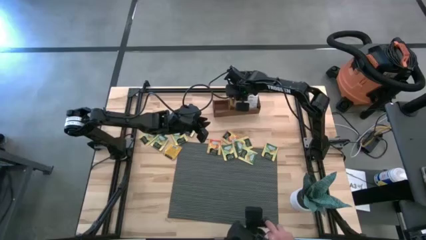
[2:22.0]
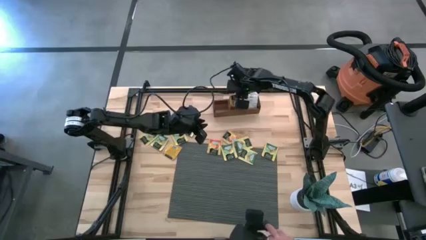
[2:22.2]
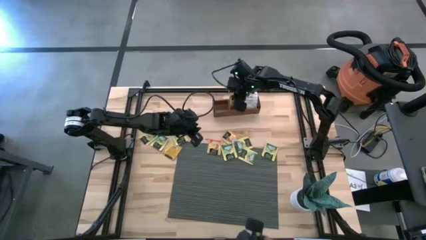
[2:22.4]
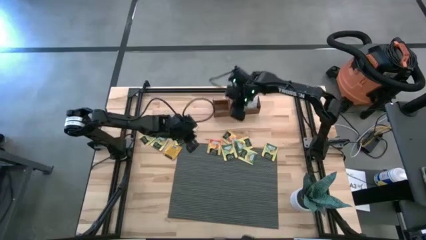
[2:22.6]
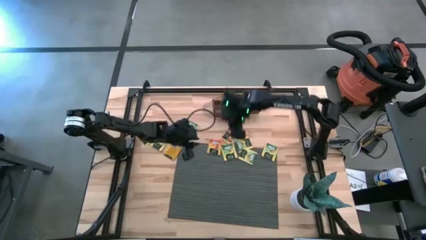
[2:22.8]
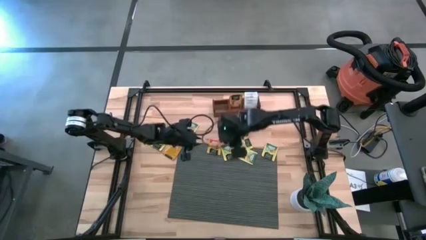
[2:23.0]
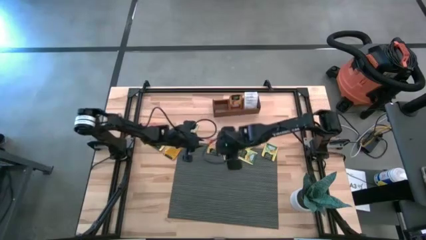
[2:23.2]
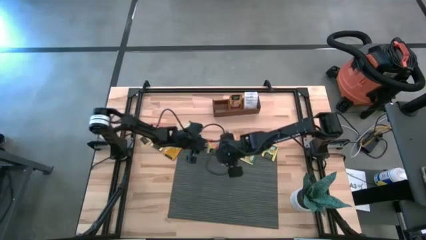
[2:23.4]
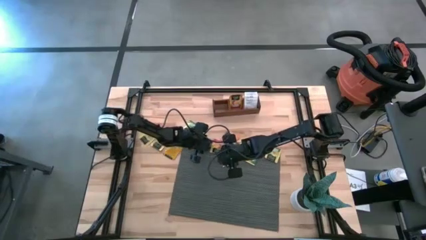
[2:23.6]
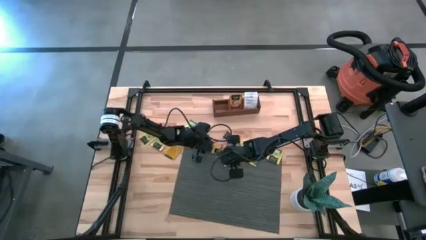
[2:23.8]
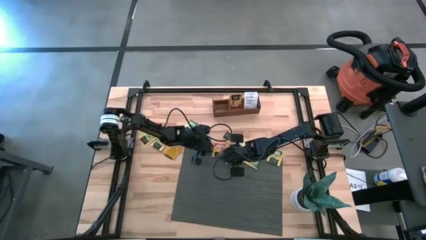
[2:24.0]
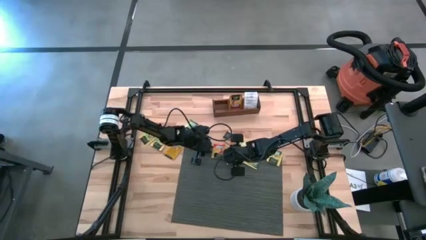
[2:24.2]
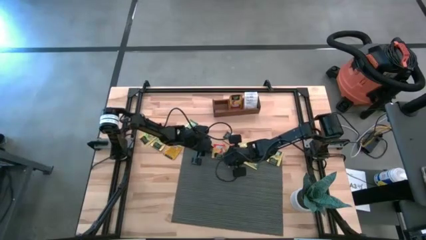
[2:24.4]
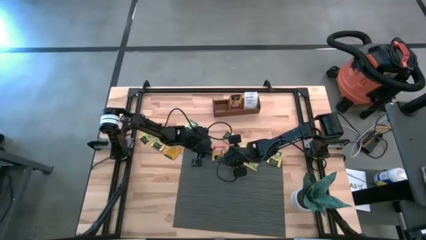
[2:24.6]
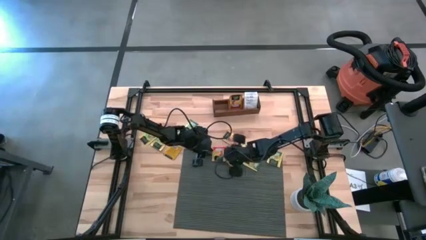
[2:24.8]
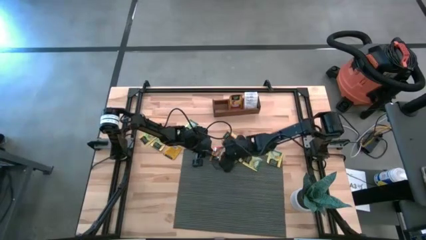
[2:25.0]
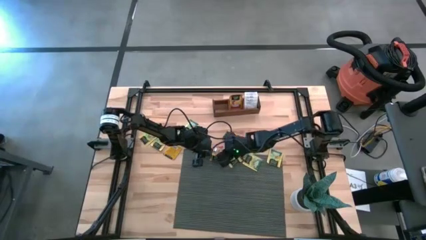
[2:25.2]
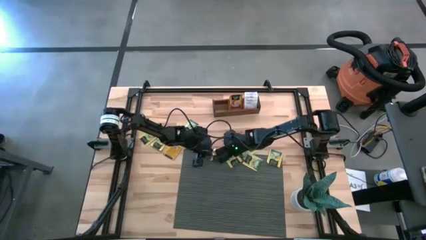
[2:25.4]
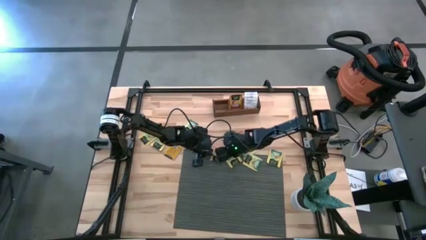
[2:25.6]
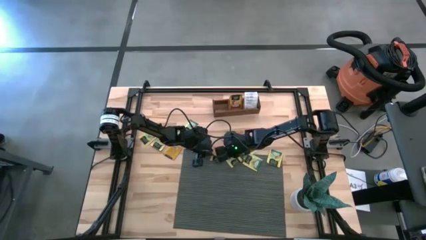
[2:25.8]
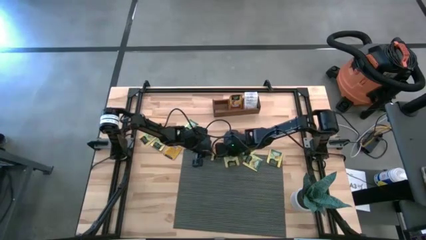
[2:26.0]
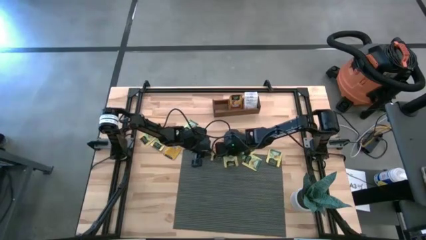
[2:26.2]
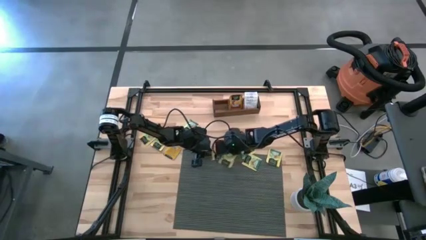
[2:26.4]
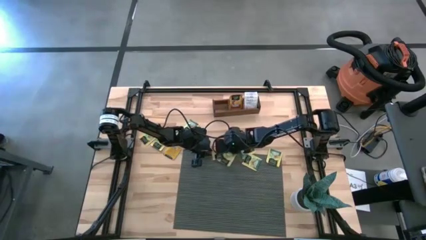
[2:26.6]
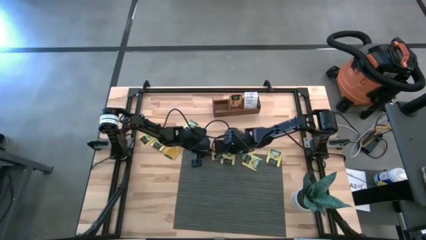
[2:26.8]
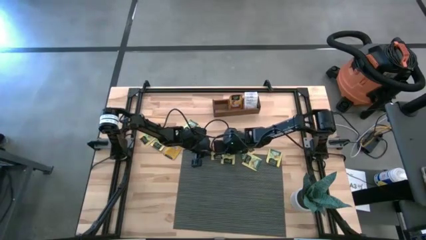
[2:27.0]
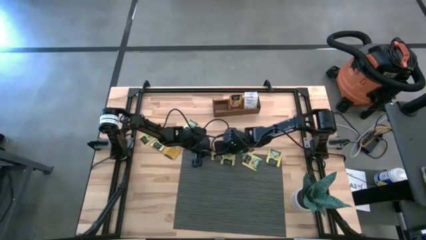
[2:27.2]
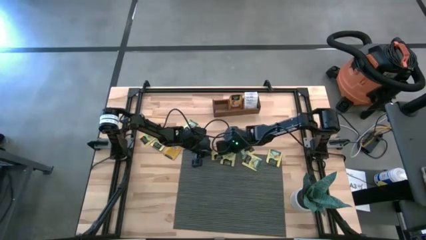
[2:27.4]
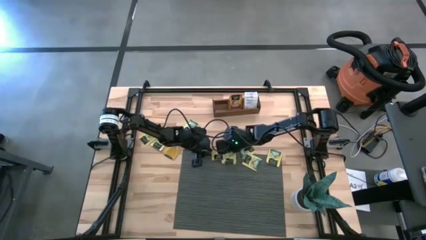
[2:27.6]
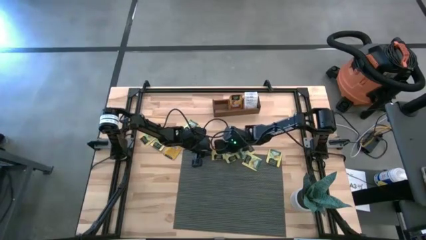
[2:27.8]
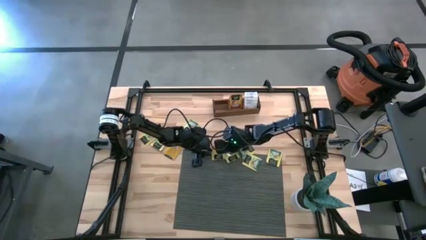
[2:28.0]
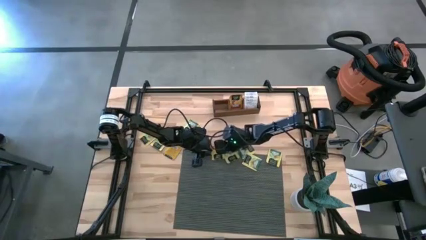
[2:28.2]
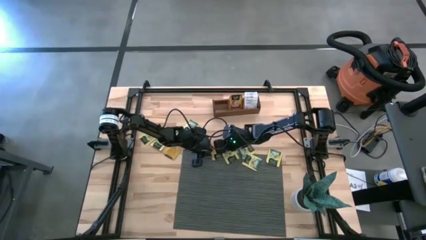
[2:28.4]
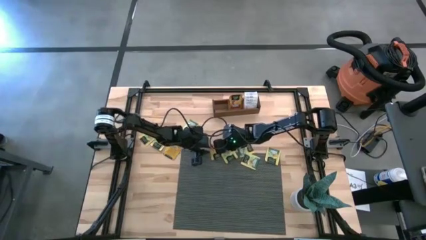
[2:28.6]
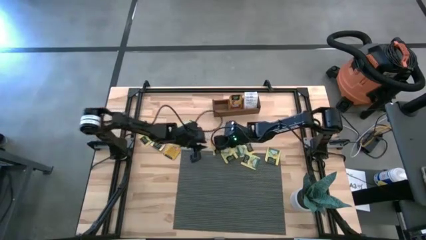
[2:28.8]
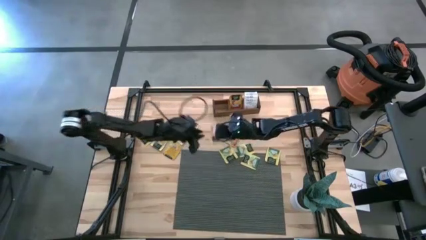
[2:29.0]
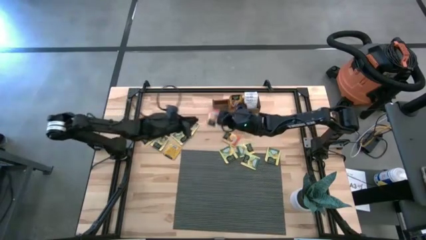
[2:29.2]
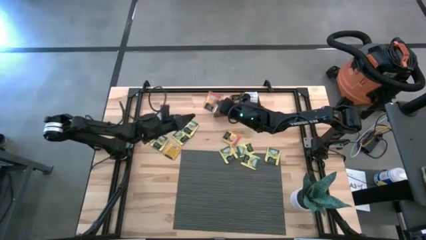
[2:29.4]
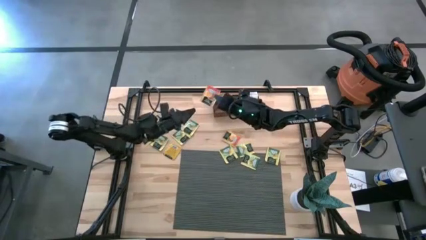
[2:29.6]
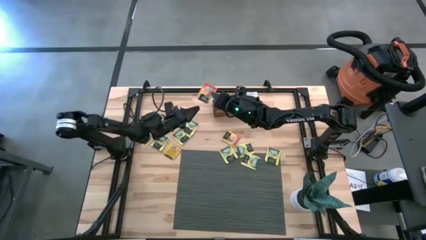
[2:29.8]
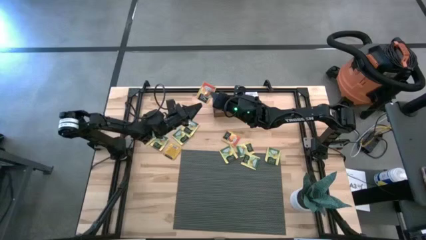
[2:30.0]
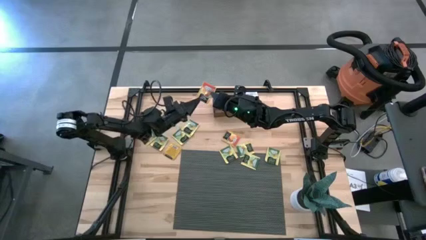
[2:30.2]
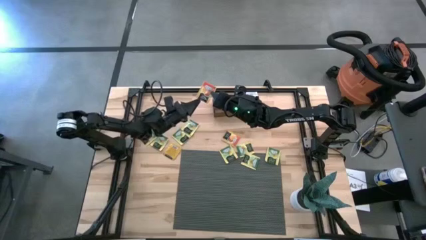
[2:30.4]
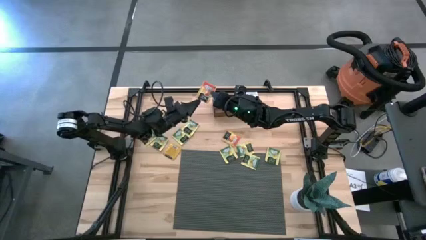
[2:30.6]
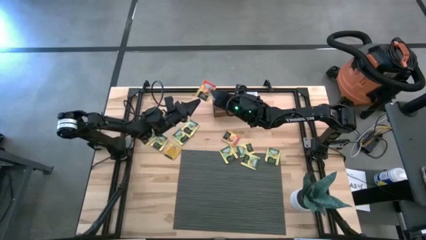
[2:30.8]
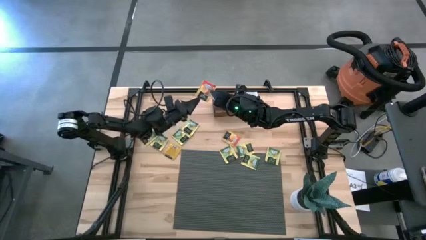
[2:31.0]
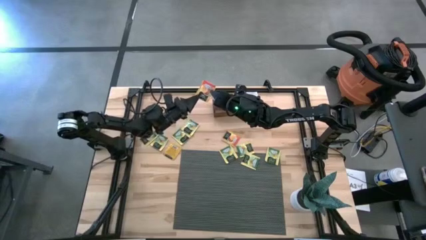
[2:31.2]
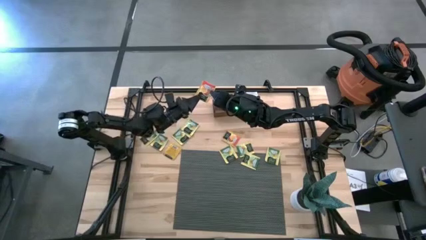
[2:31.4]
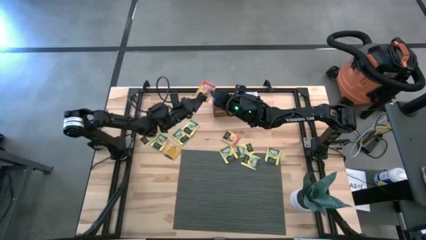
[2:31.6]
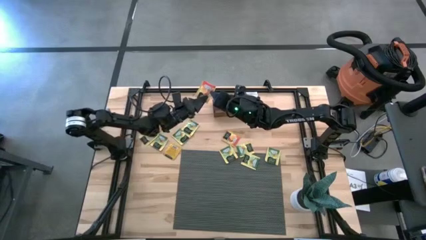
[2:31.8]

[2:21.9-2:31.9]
Task: Pick & Place Tea
Put the orange tea bag into the middle section of the wooden organizer

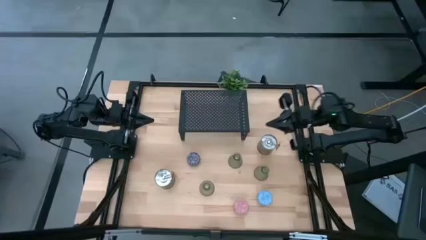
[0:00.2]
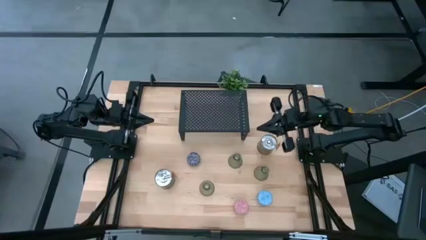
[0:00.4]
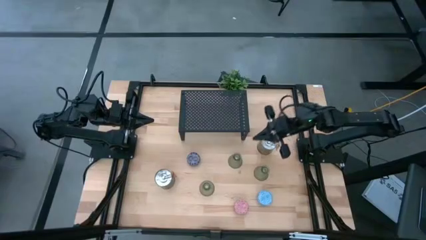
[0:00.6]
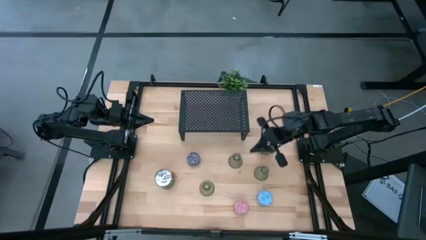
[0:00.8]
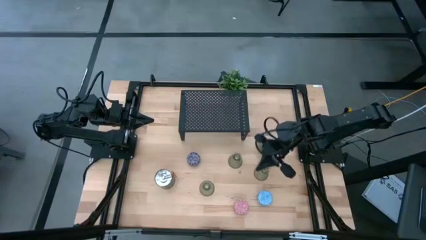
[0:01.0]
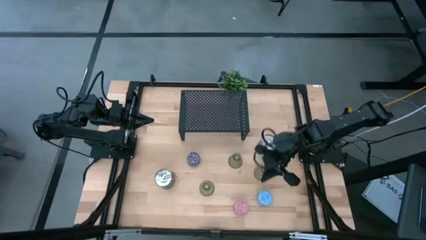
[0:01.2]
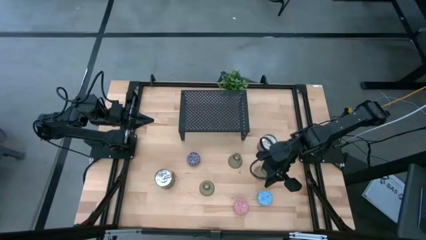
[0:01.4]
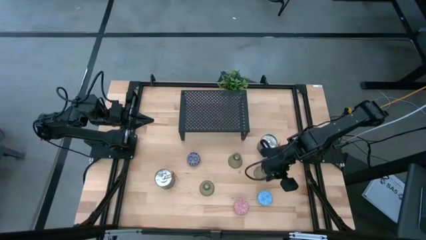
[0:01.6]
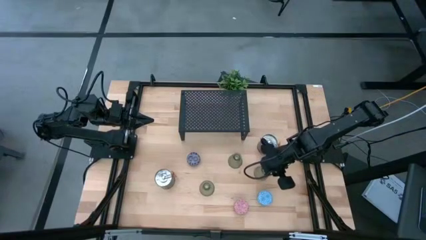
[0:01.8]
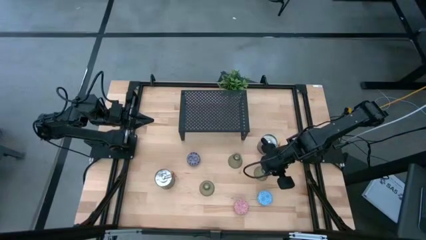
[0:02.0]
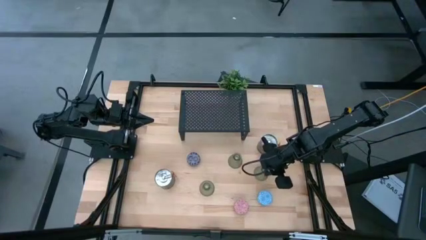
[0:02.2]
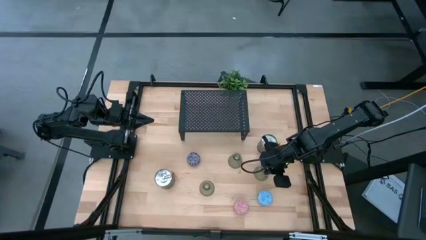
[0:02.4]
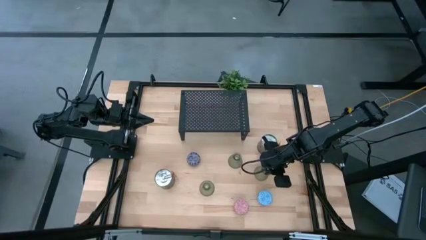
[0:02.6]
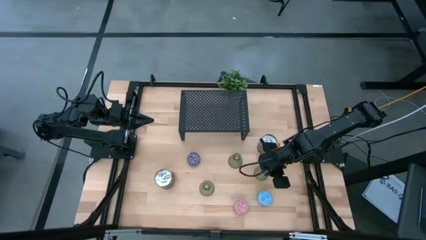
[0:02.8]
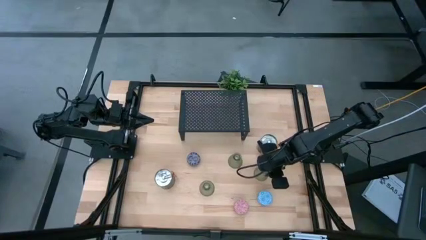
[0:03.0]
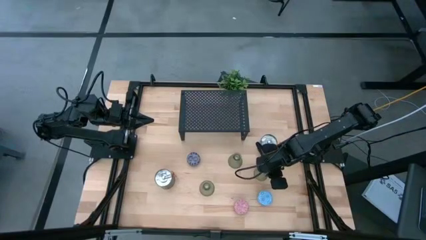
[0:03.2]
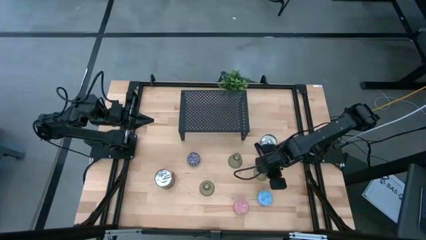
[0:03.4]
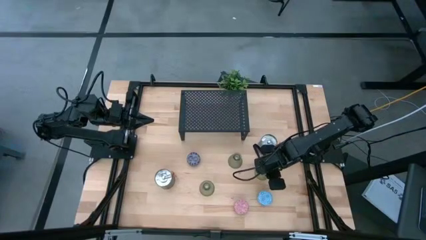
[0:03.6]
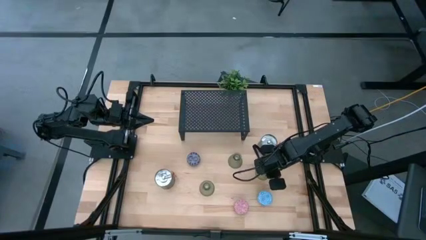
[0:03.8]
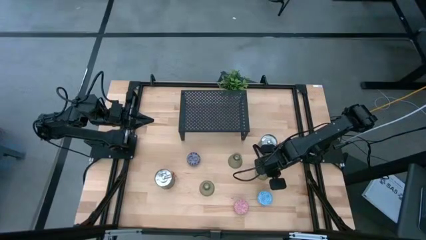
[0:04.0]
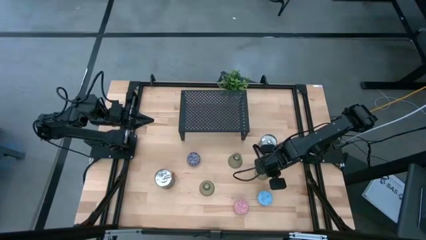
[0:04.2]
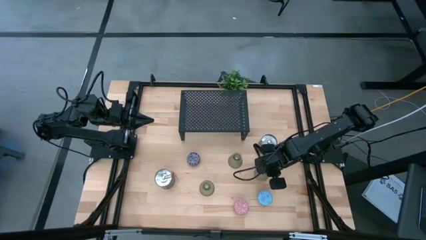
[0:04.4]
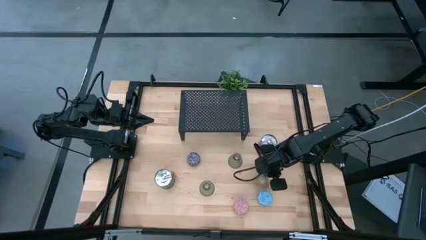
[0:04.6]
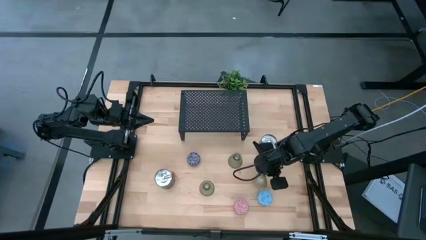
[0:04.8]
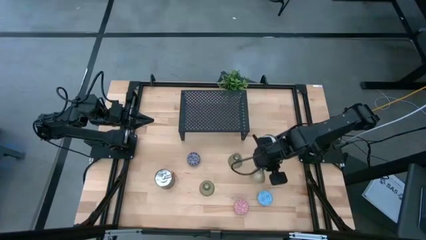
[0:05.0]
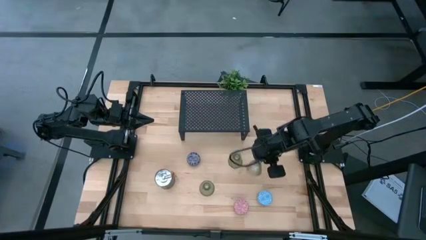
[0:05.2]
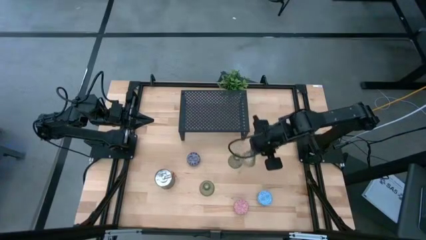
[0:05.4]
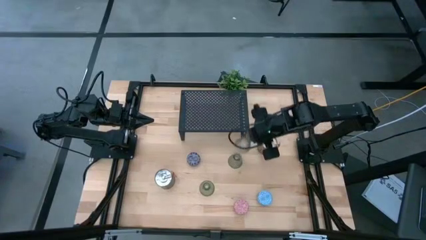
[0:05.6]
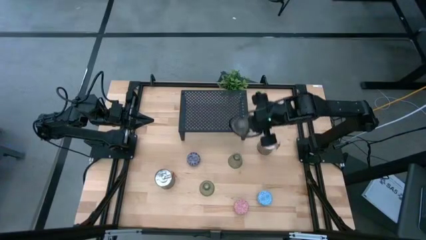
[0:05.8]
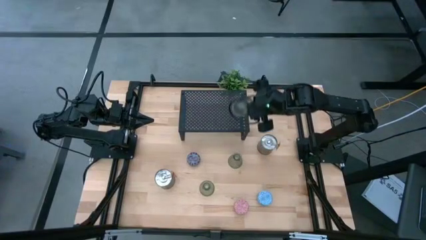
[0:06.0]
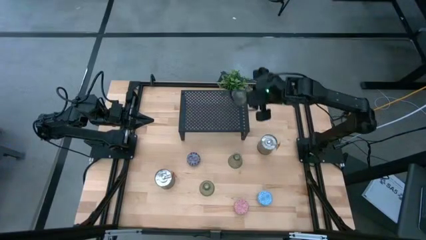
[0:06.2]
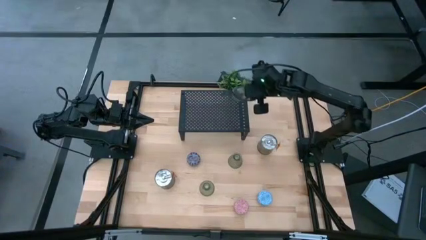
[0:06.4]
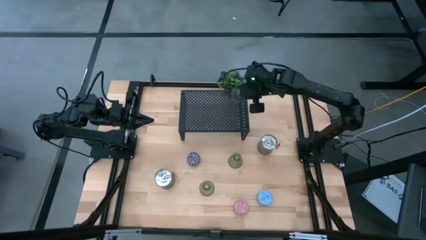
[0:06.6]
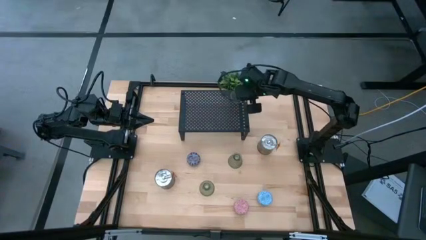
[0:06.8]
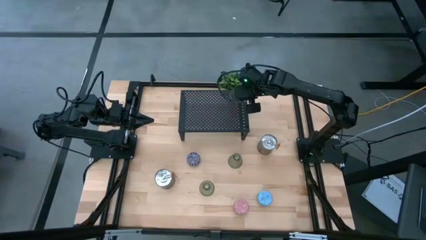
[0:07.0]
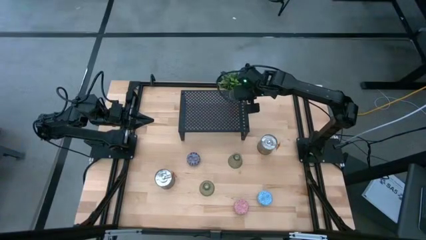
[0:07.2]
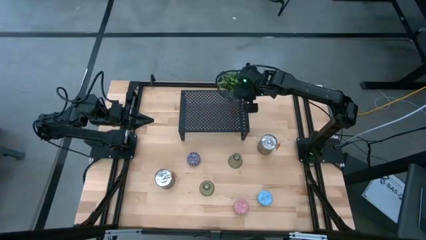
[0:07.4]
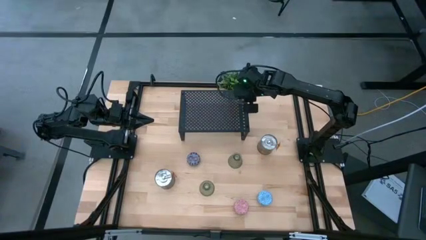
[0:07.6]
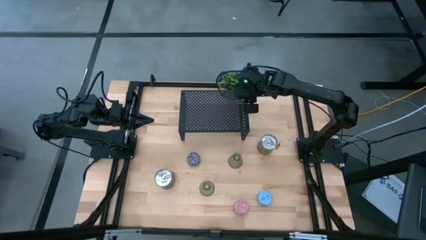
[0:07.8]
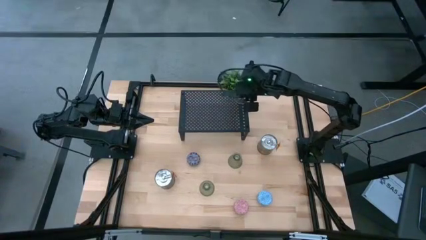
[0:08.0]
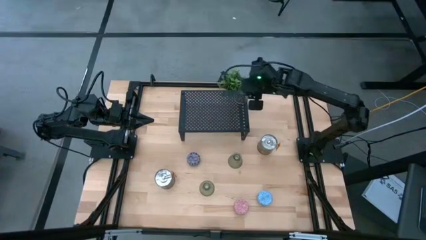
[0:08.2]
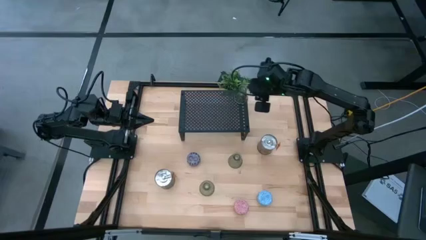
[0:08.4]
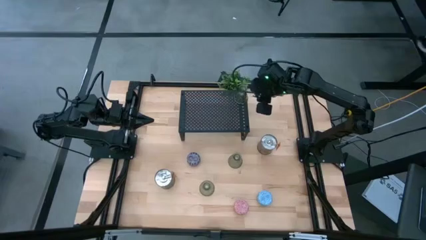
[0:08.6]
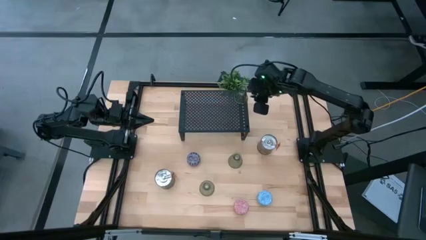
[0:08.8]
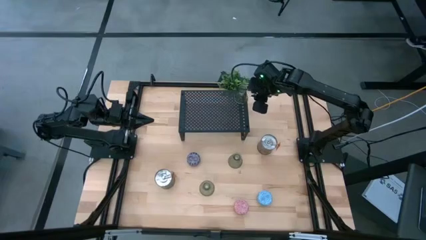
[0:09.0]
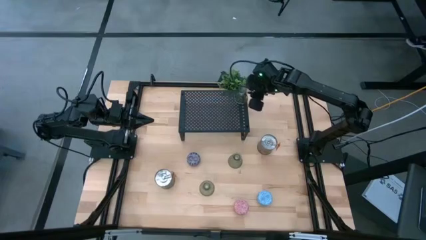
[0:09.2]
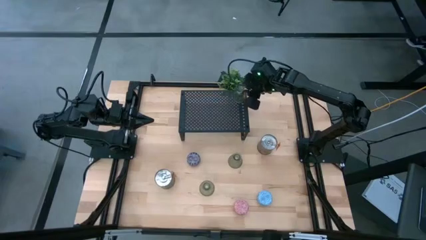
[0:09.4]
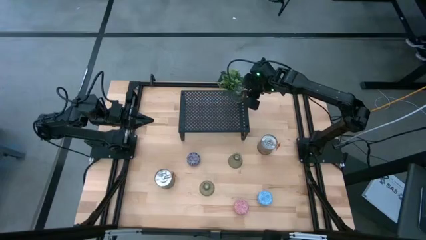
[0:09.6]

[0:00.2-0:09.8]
Task: Pick & Place candle stick holders
Put the right transparent glass candle holder on the shelf
